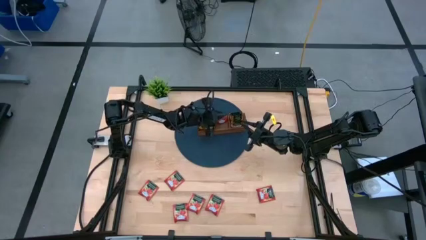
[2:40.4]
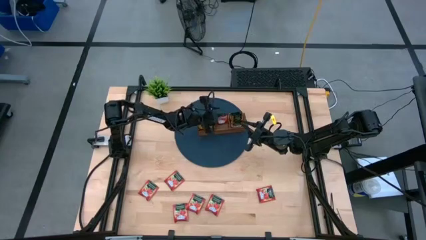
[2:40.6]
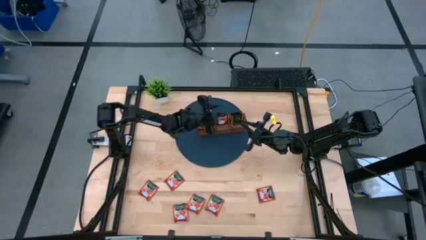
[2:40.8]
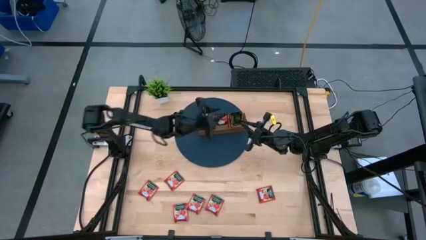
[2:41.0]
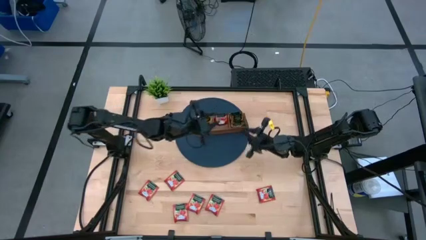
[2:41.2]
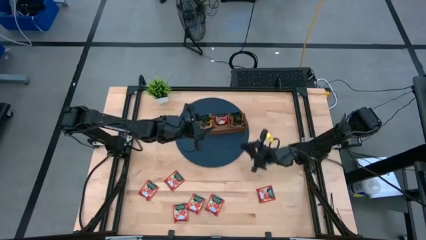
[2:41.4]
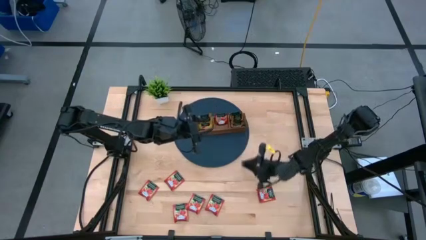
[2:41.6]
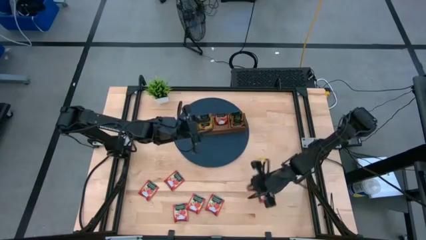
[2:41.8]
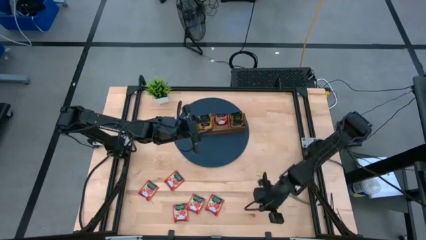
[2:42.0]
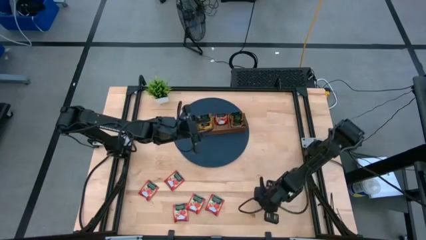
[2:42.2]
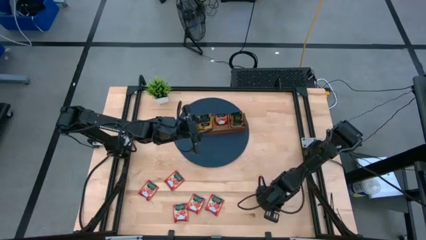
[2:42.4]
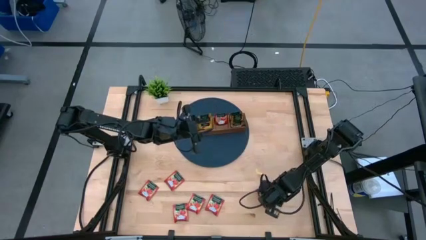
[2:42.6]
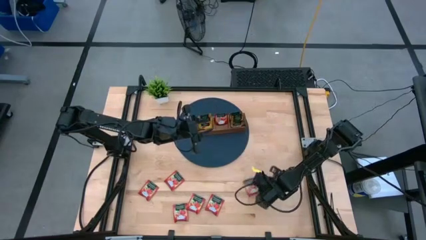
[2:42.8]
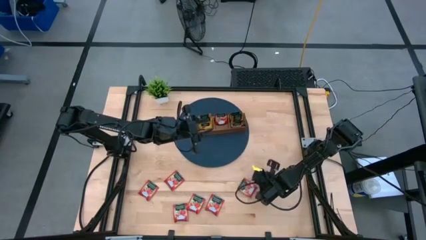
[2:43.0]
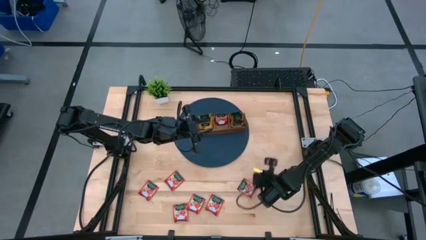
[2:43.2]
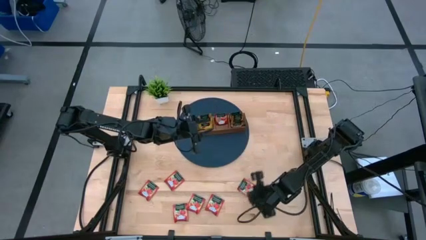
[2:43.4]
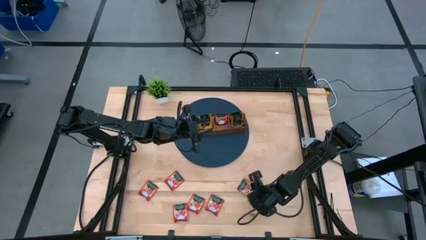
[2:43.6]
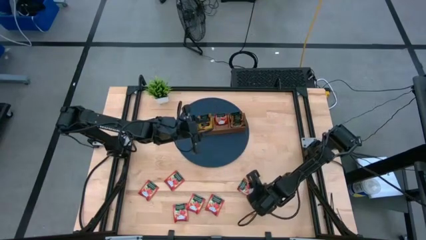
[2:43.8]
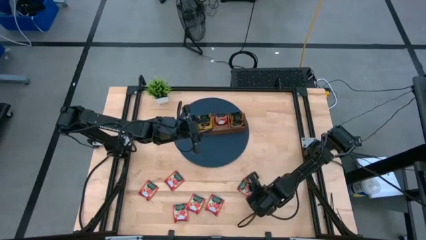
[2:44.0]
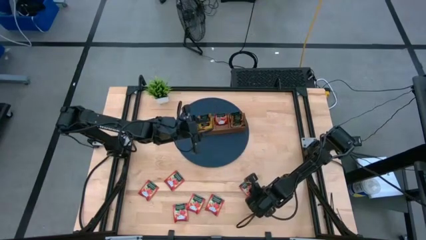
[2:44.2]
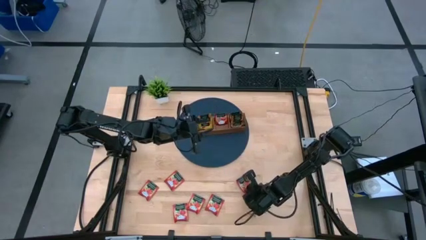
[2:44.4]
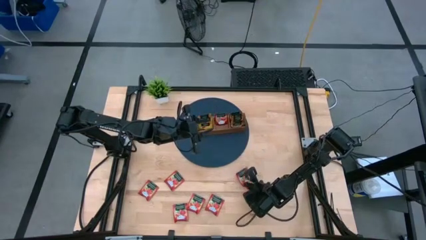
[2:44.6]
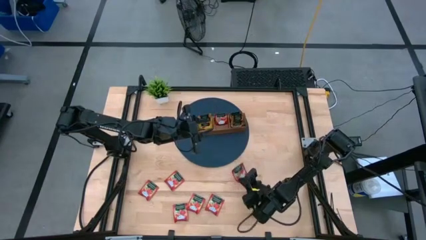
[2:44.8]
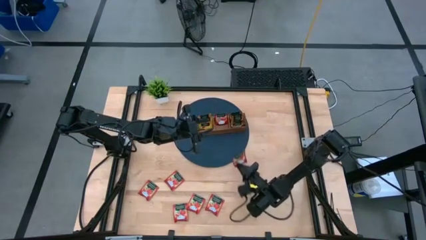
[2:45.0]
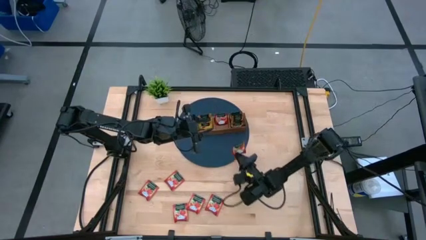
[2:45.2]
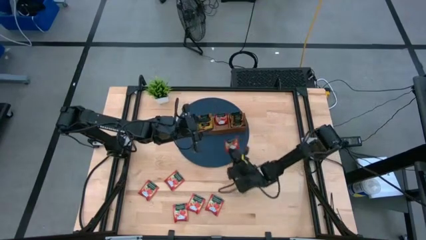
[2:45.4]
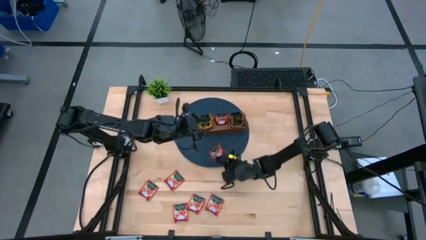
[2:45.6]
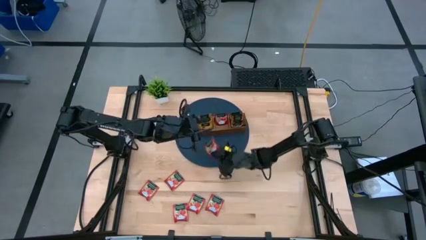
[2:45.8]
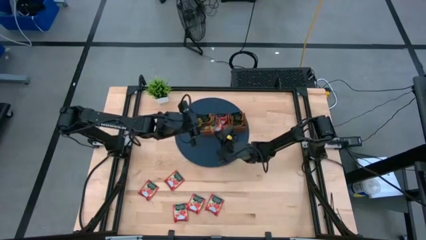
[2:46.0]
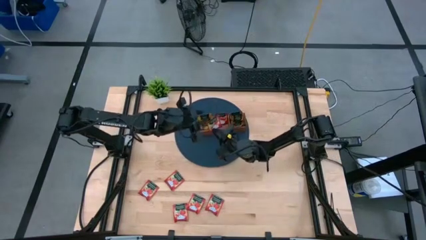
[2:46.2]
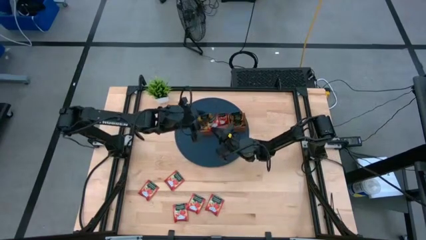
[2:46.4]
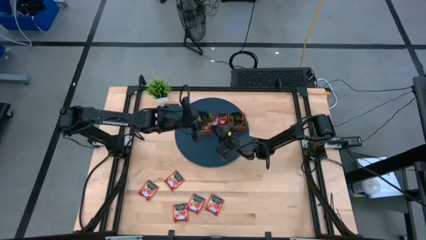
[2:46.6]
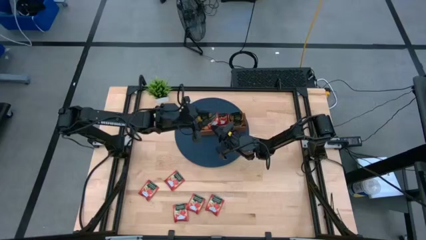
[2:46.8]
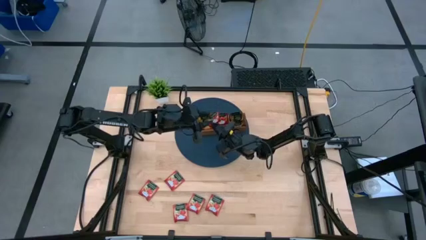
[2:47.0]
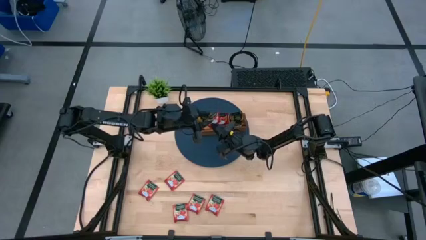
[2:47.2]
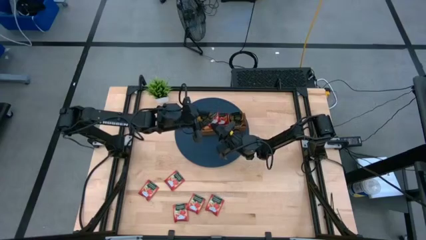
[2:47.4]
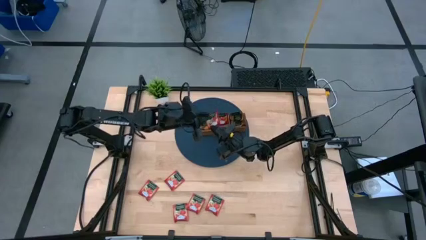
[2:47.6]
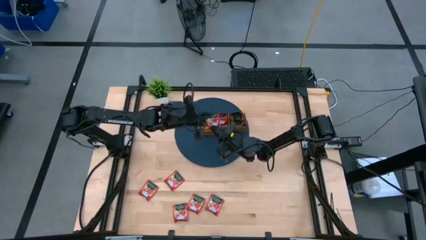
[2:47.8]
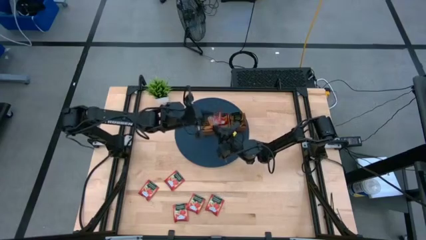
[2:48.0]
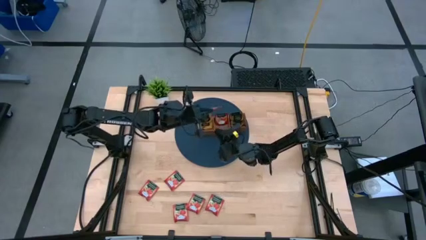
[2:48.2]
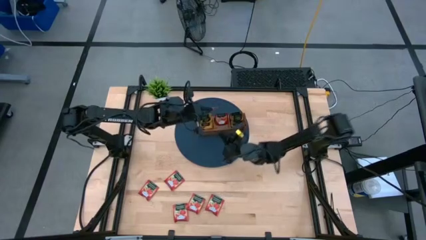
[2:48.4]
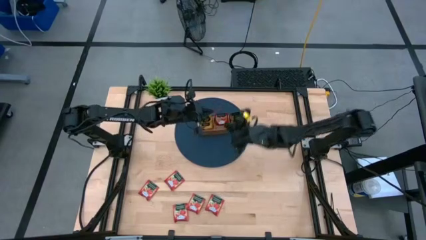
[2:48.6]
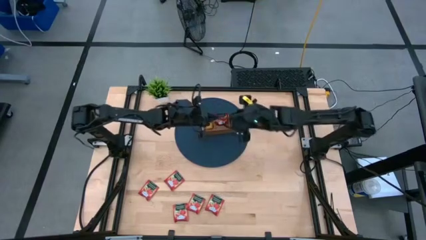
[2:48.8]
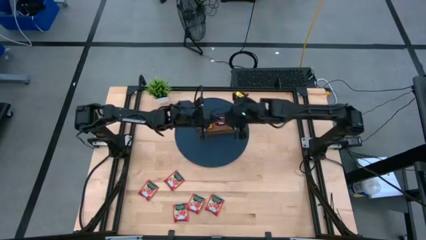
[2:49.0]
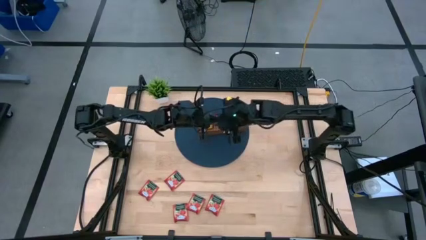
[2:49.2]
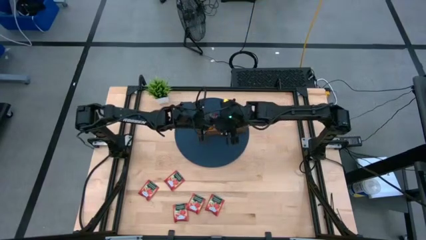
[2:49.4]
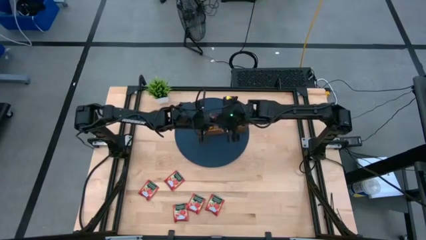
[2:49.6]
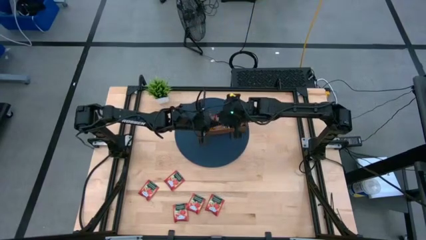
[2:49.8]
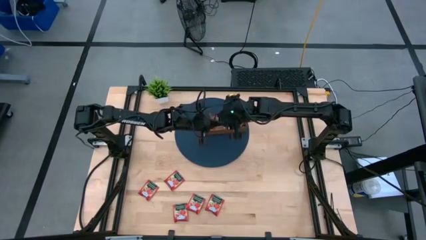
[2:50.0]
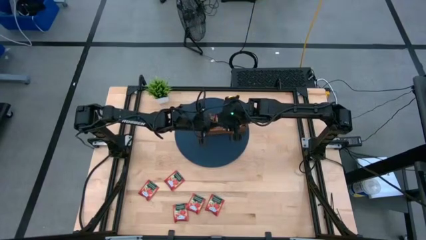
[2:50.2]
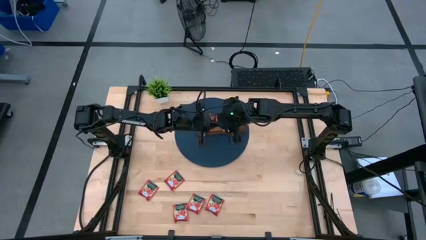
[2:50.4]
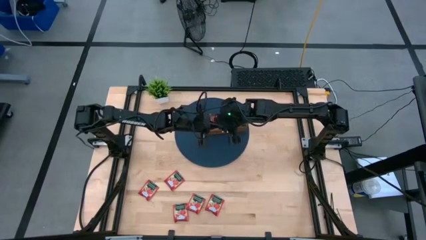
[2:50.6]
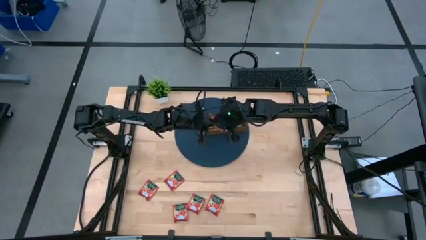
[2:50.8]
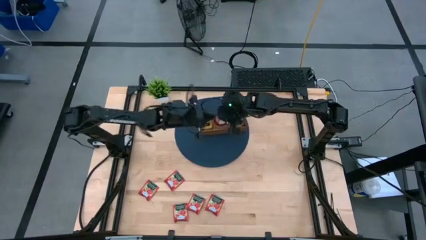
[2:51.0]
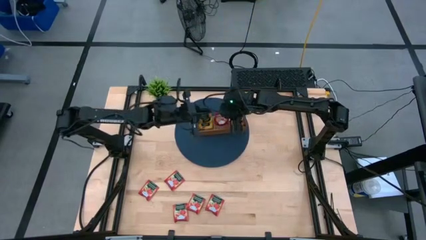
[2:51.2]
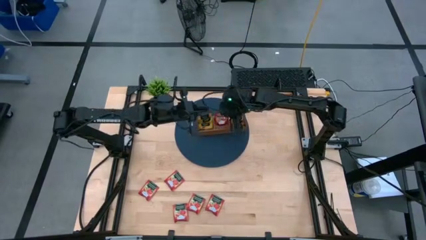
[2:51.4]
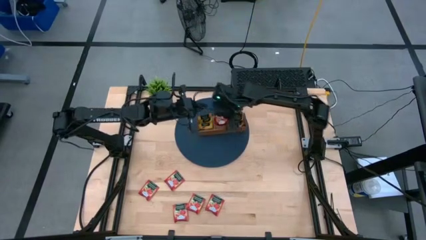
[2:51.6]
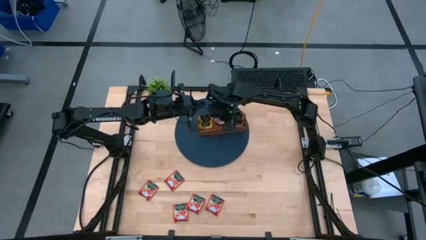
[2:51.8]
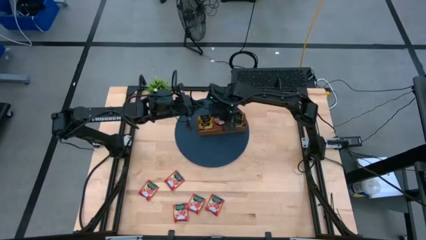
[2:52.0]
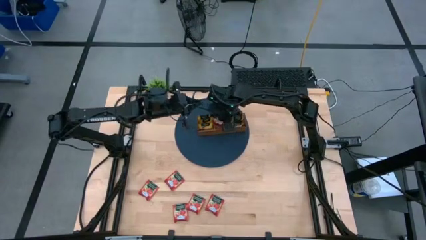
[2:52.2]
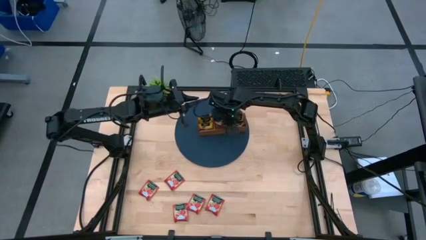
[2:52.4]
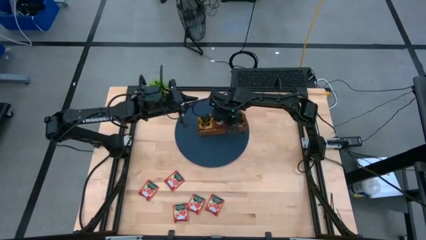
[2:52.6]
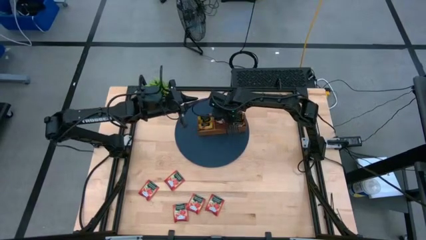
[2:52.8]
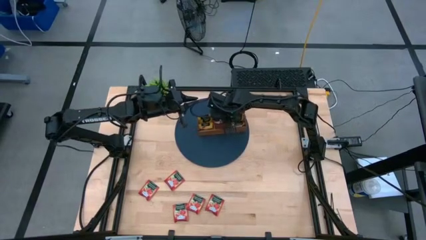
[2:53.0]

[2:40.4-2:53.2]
Task: Pick & Place Tea
Put the red tea bag into the middle section of the wooden organizer
